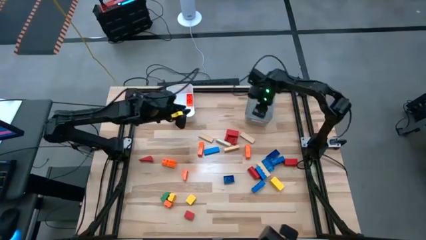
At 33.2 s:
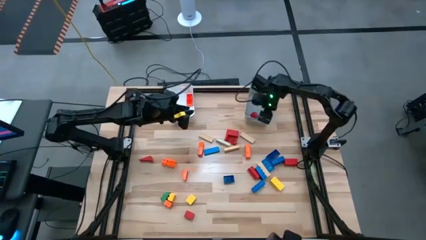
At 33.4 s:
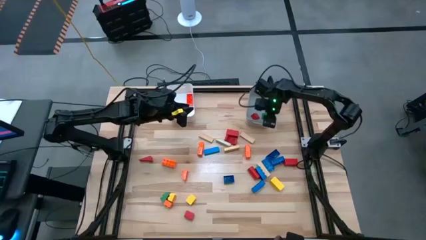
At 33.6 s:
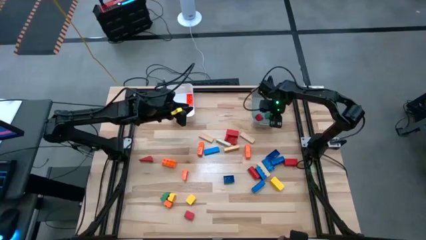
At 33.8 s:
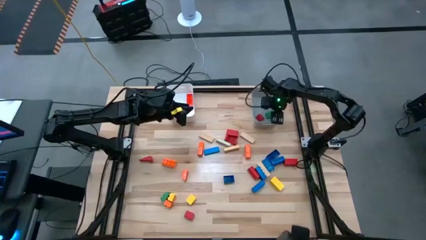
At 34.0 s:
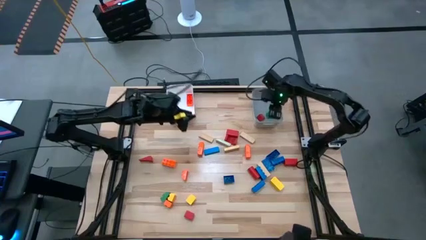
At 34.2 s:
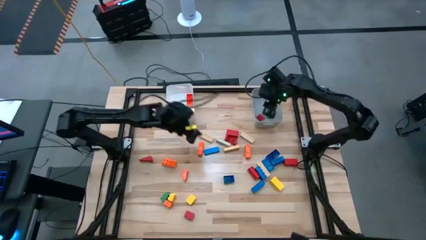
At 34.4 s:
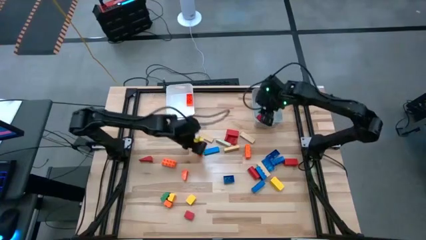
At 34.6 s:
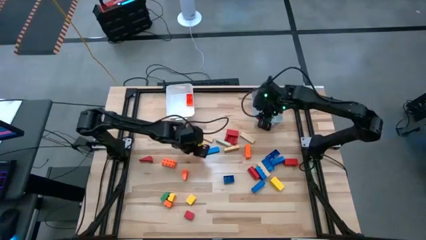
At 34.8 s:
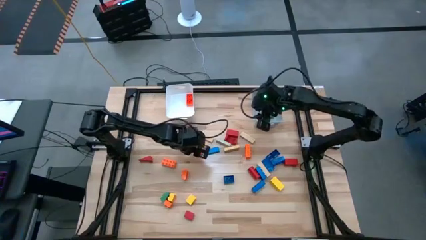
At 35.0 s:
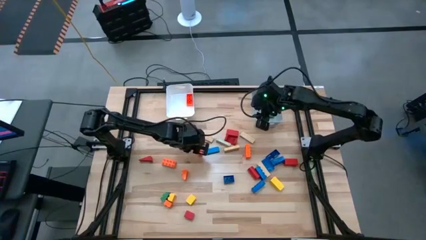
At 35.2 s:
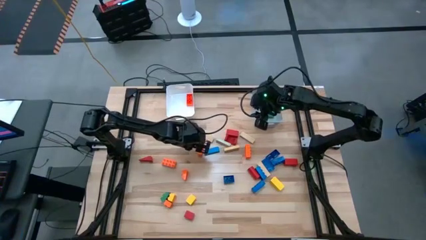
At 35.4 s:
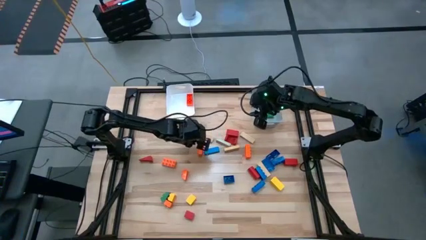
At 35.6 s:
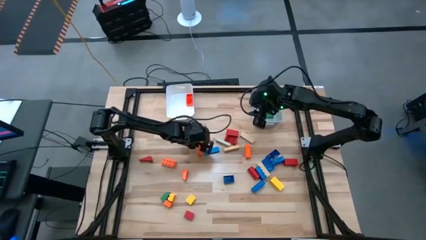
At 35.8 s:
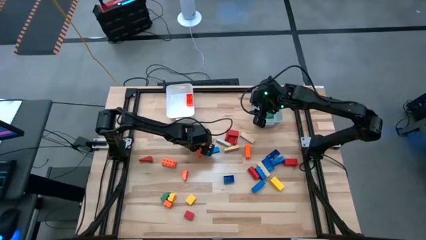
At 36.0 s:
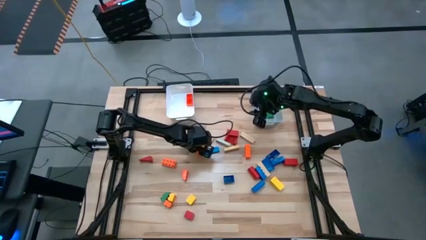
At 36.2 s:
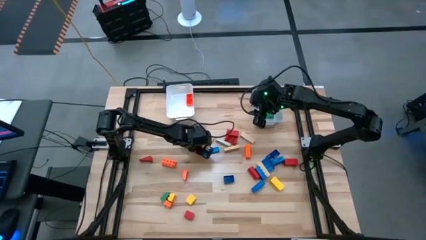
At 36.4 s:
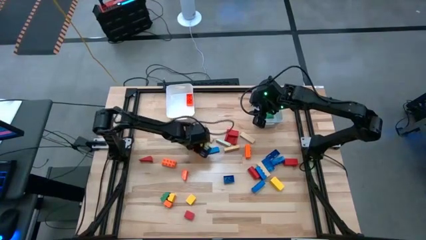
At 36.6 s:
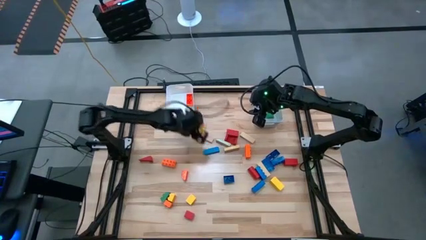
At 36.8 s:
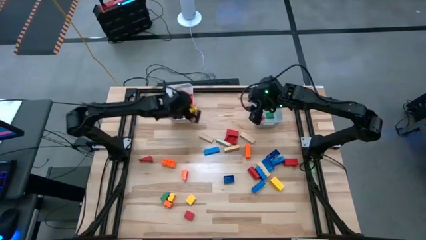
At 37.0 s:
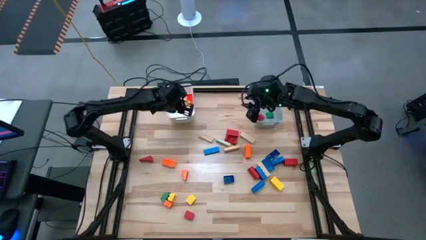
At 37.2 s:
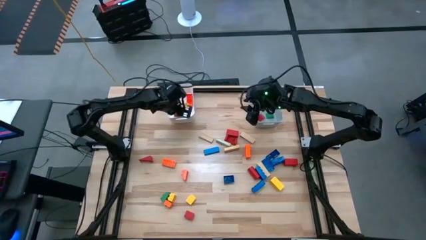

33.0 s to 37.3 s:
Task: Sort blocks by size
Put the orange rectangle game piece into the white bin

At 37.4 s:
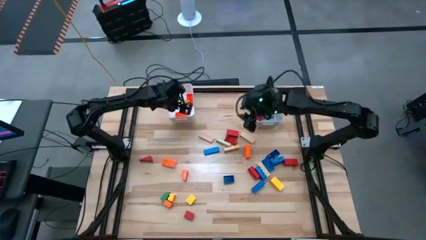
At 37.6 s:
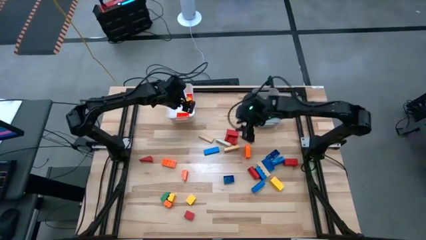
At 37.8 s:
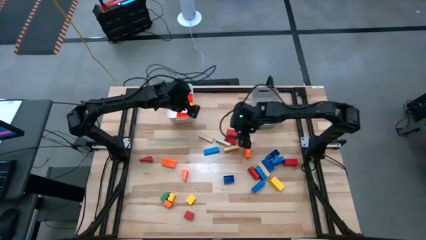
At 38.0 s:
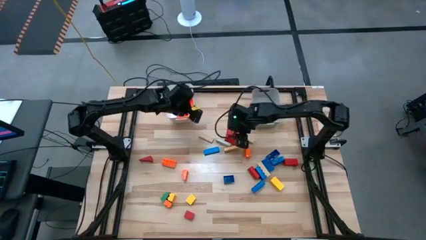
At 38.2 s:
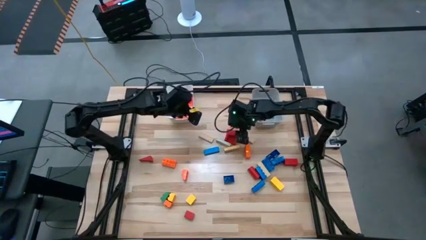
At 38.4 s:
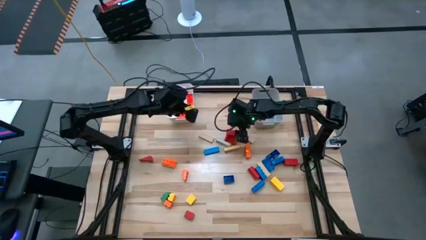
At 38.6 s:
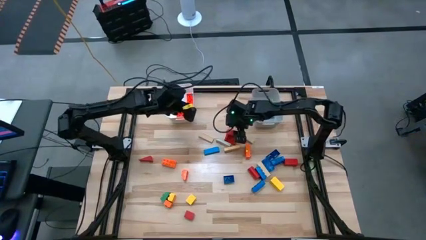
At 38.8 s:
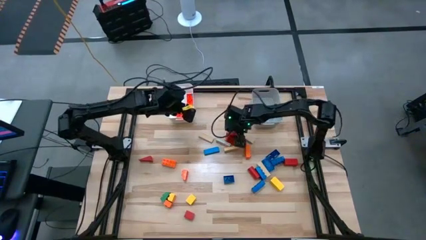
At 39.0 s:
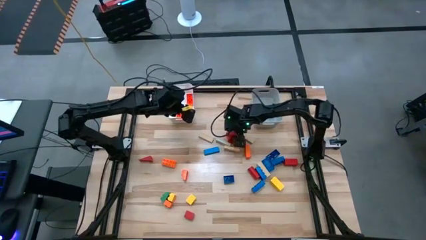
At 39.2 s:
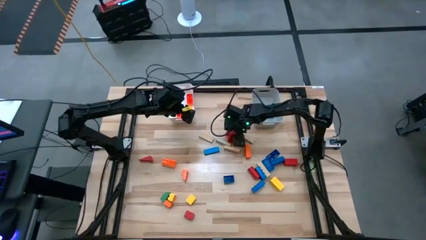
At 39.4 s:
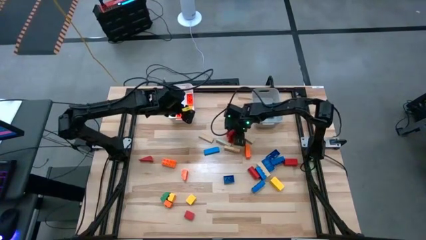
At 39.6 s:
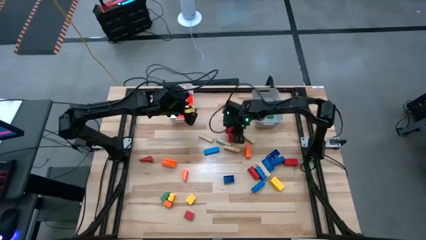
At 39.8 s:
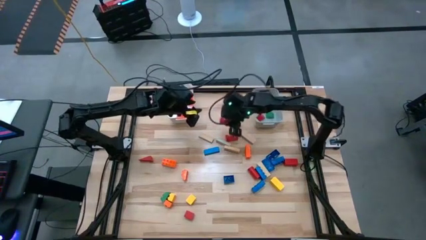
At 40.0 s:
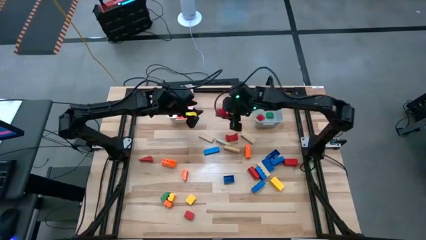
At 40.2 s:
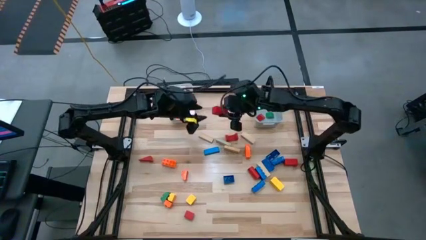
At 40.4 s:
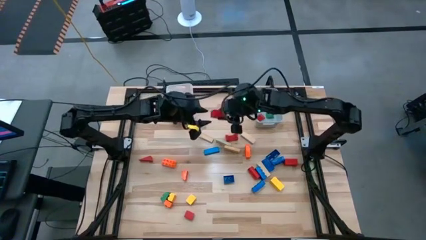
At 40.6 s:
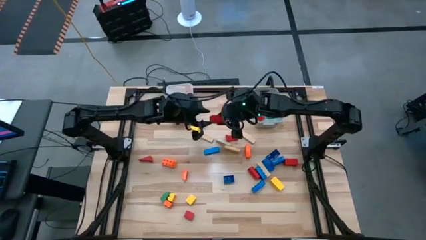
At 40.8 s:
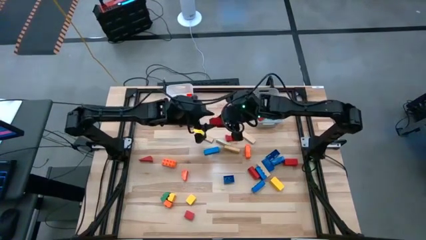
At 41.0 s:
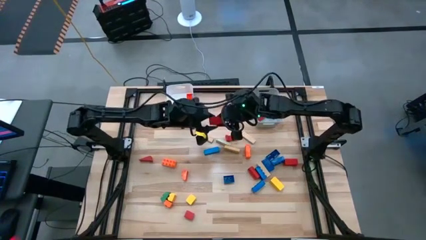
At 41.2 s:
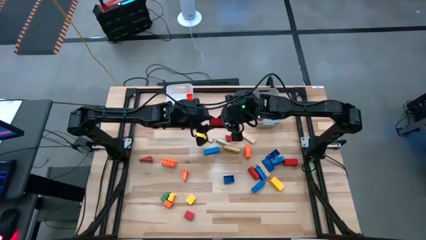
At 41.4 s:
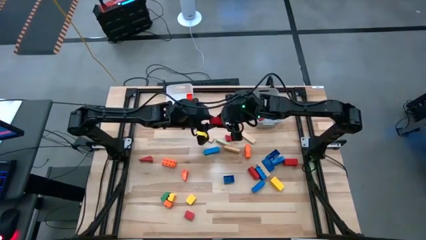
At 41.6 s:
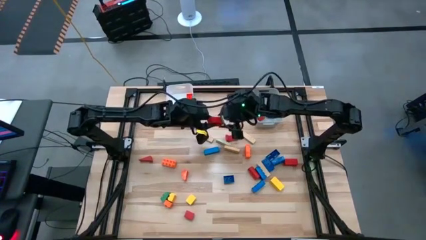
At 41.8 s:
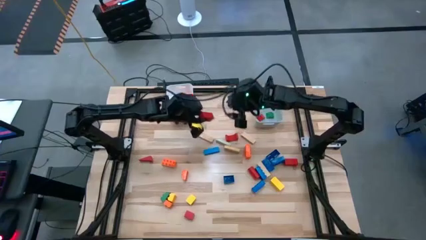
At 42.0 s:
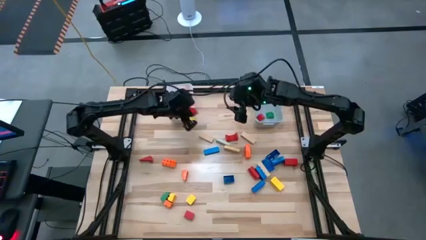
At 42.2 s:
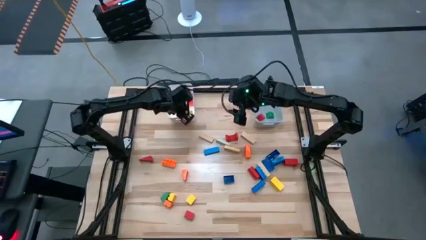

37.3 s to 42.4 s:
Put the red rectangle wooden block into the white bin

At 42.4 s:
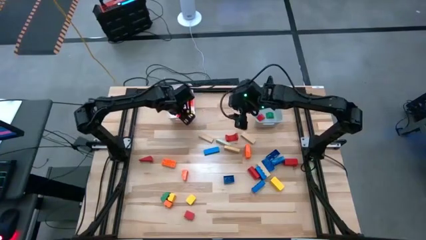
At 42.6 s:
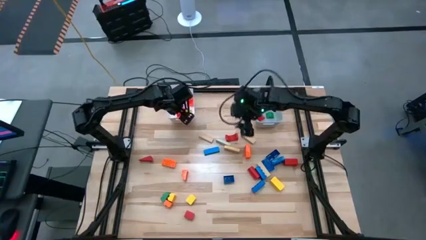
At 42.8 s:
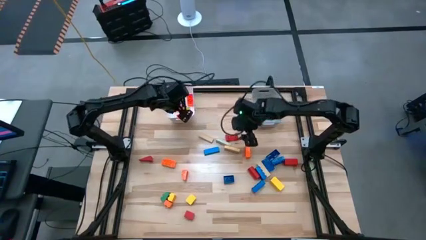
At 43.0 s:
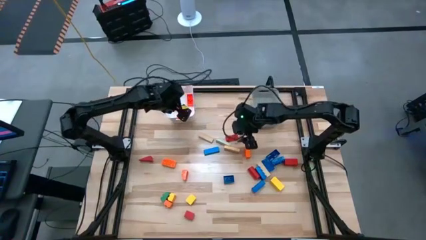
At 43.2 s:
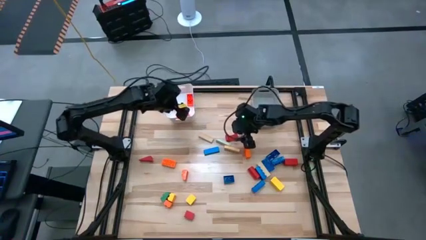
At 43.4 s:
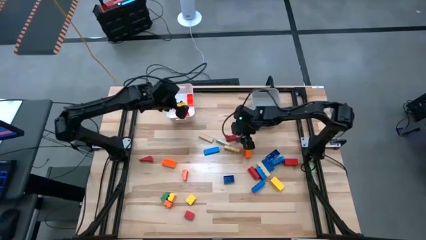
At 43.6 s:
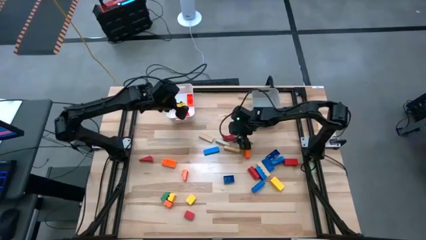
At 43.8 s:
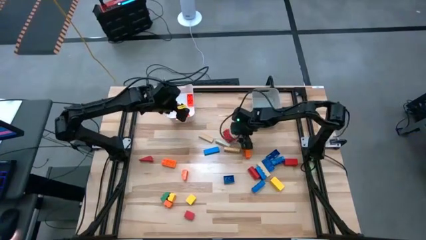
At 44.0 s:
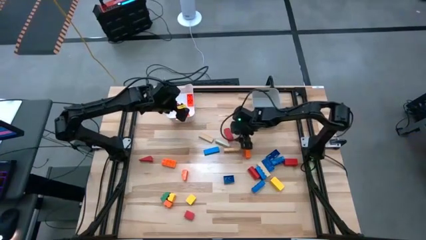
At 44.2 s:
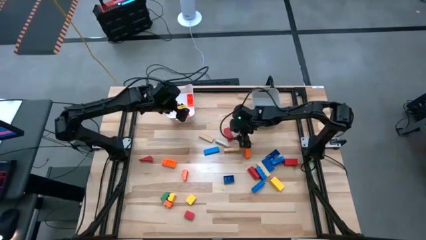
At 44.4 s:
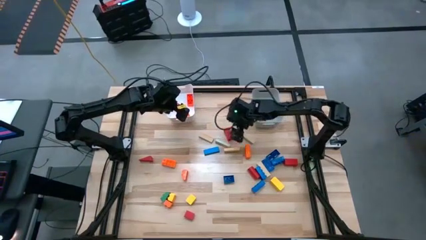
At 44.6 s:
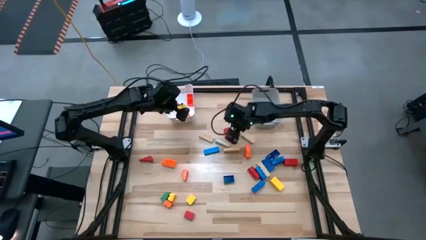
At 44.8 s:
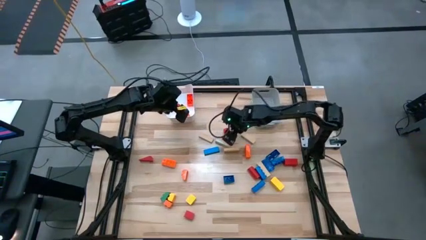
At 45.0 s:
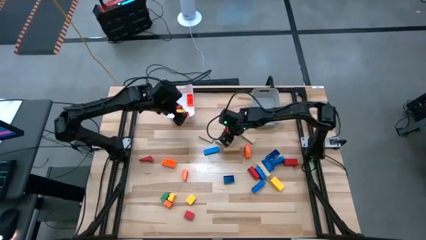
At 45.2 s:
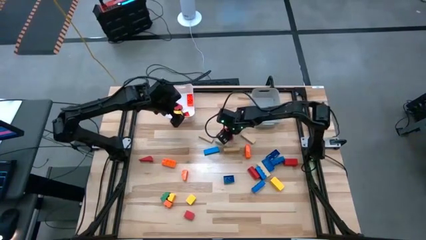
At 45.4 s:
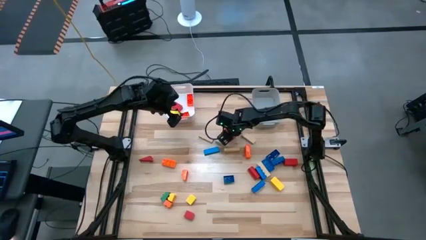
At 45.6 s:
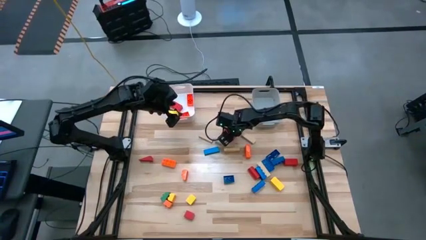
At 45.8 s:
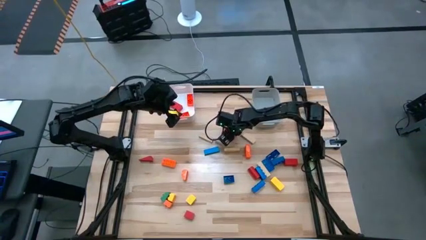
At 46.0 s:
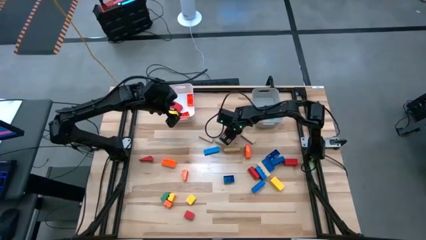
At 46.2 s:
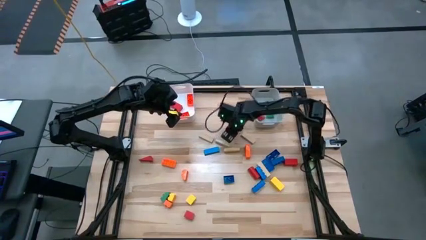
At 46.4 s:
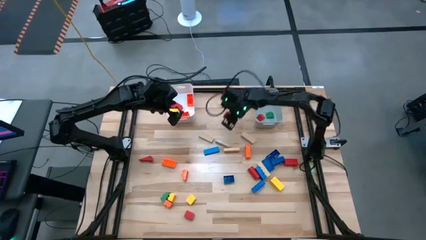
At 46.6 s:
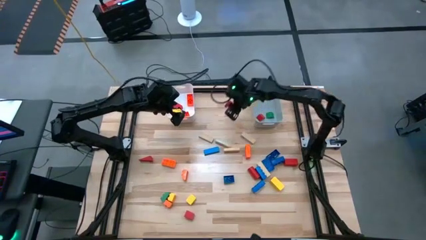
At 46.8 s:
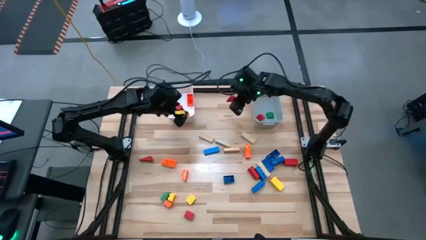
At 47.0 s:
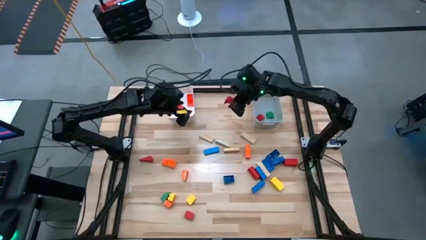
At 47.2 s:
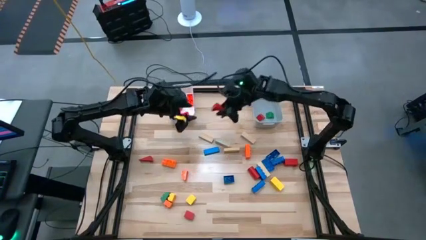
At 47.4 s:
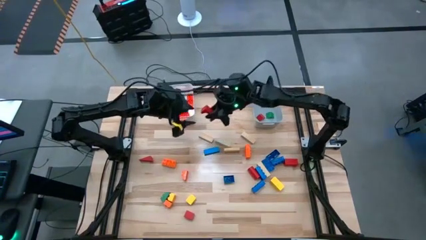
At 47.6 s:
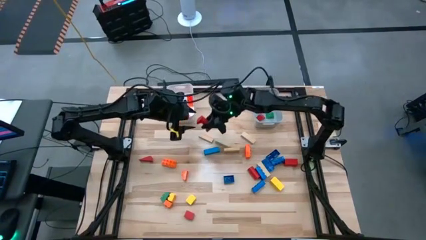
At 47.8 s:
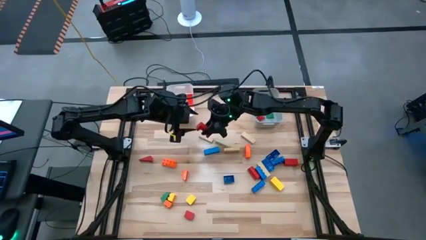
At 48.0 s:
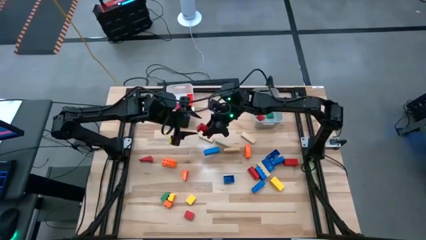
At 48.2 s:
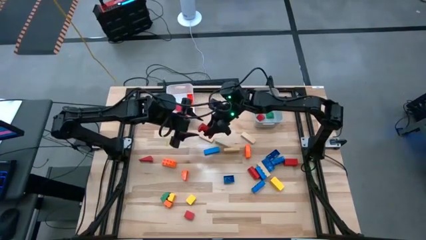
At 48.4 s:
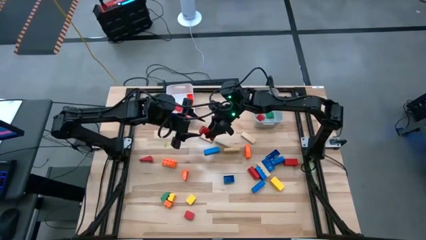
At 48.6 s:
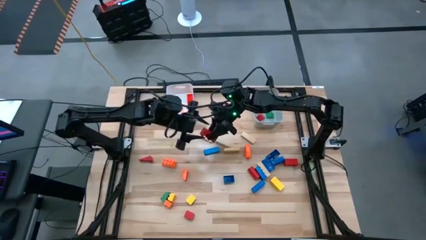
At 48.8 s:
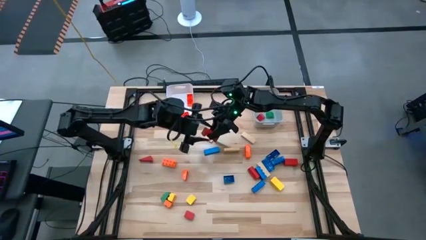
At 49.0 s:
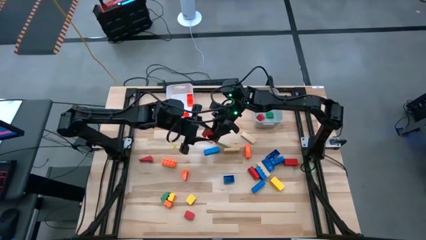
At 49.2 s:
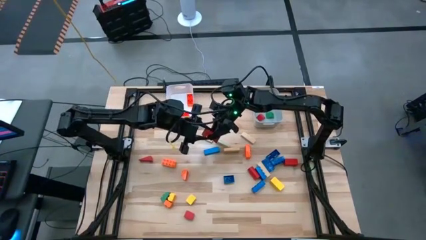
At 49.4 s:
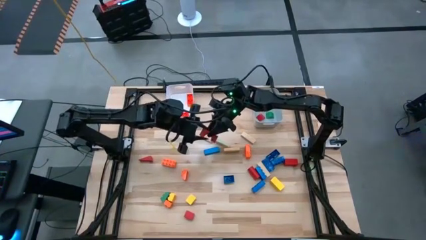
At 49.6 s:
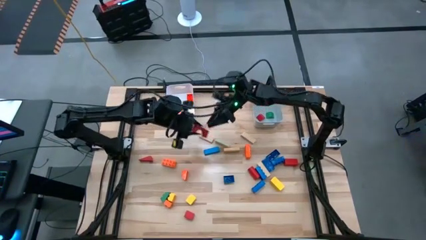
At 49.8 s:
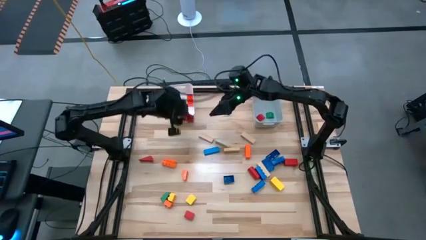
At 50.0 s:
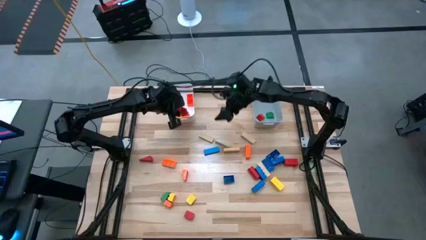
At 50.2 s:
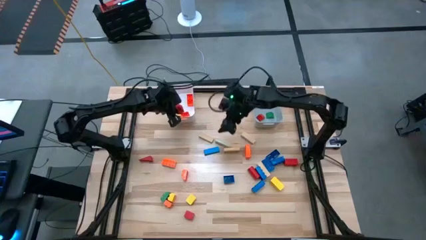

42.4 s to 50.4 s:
Put the red crescent wooden block into the white bin
